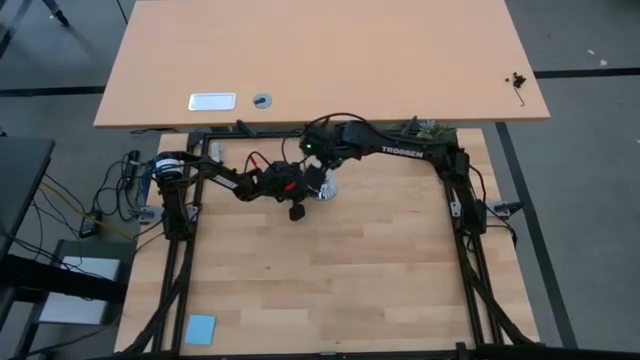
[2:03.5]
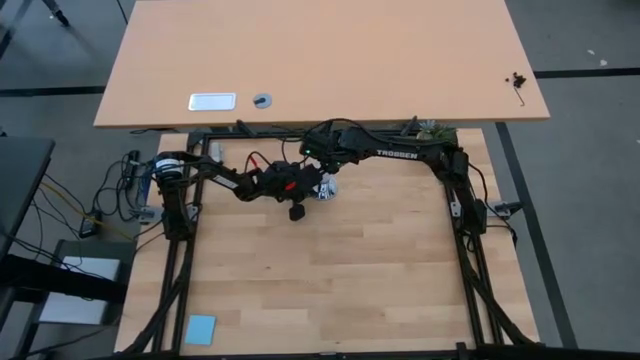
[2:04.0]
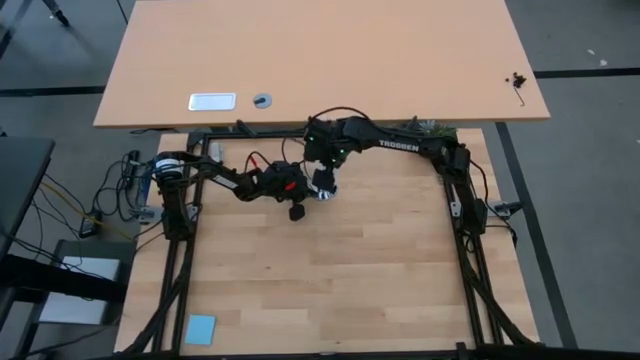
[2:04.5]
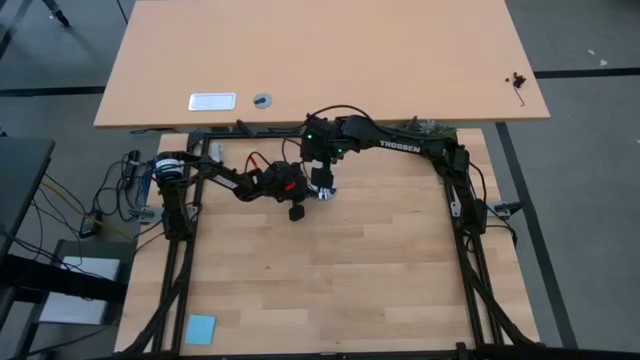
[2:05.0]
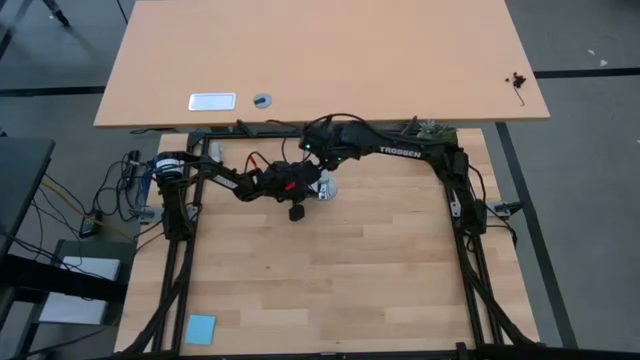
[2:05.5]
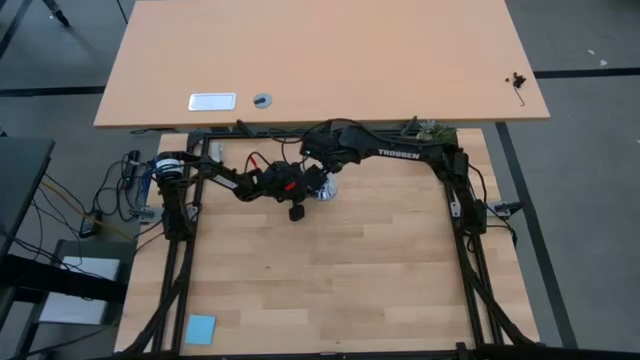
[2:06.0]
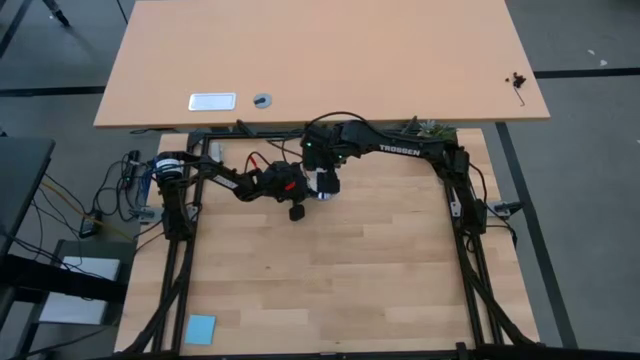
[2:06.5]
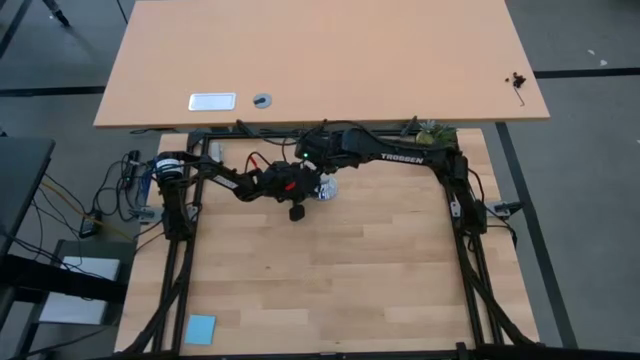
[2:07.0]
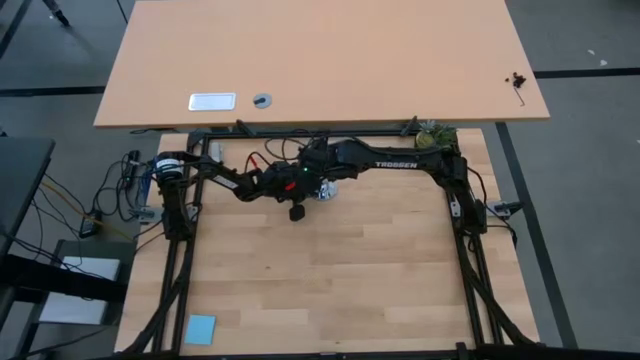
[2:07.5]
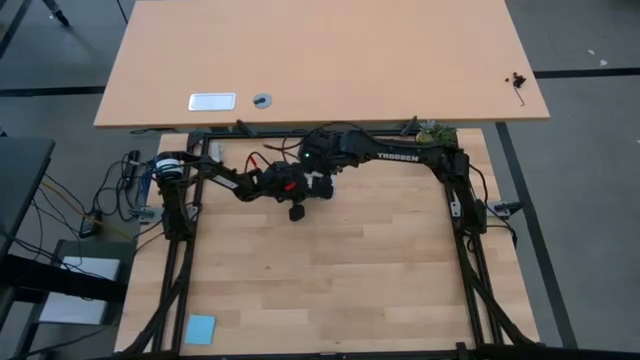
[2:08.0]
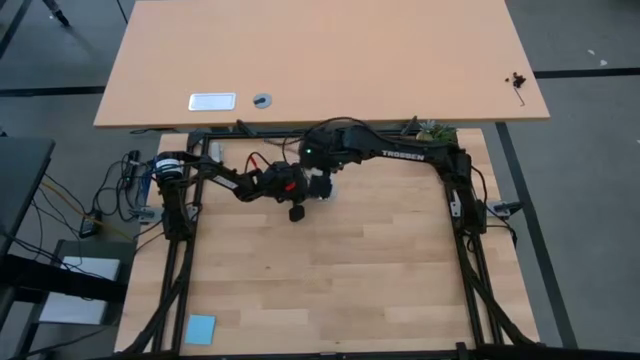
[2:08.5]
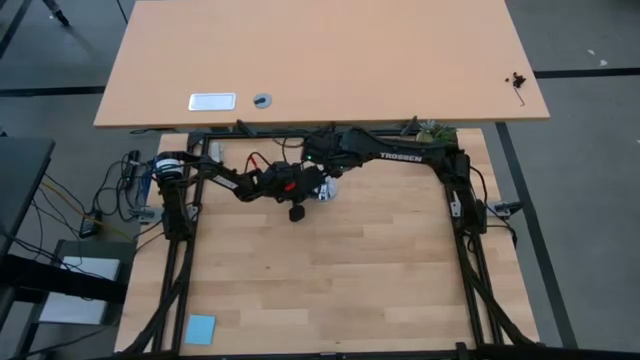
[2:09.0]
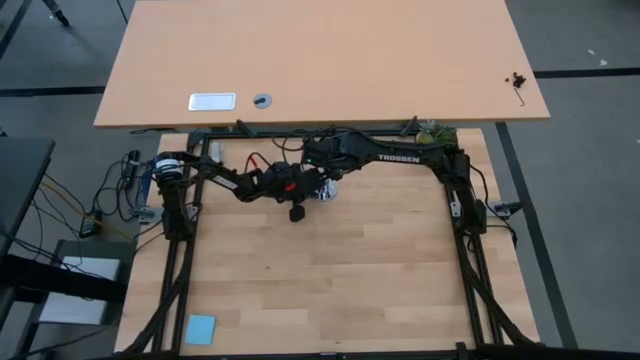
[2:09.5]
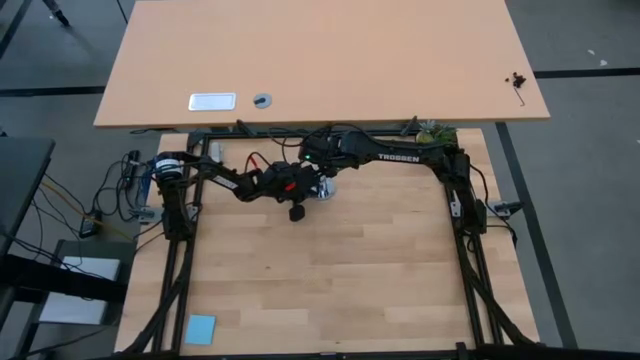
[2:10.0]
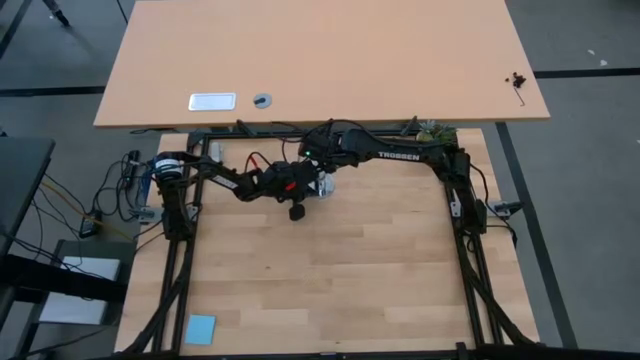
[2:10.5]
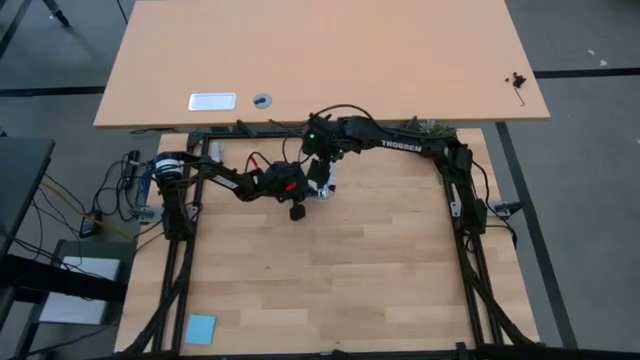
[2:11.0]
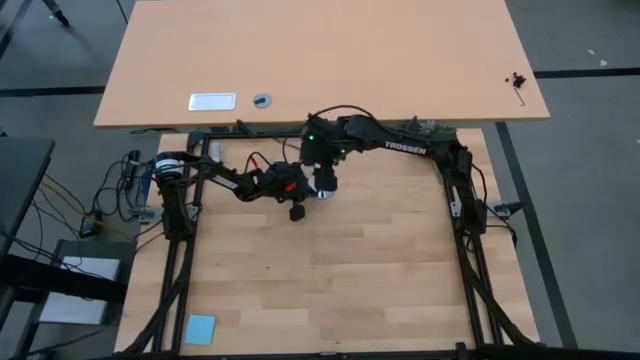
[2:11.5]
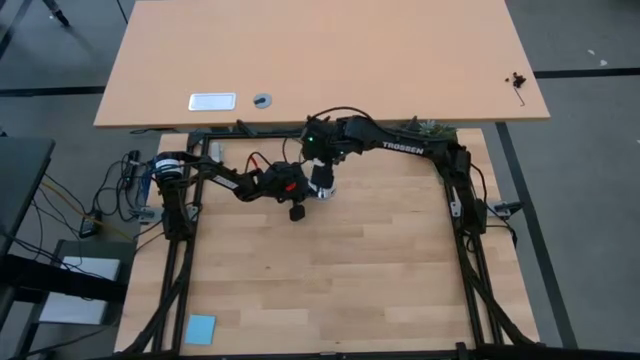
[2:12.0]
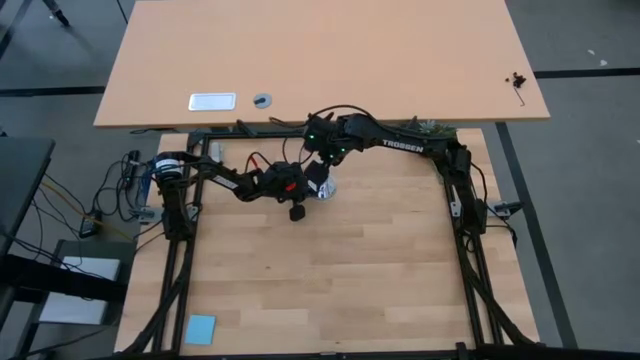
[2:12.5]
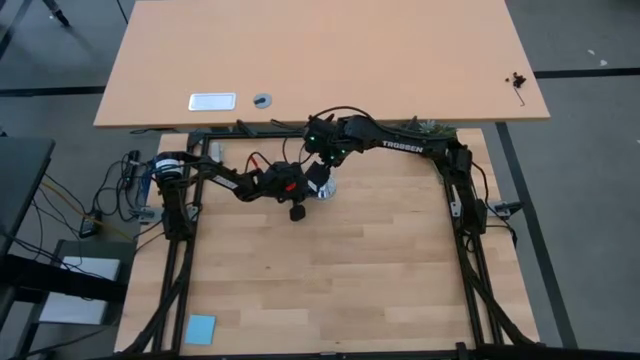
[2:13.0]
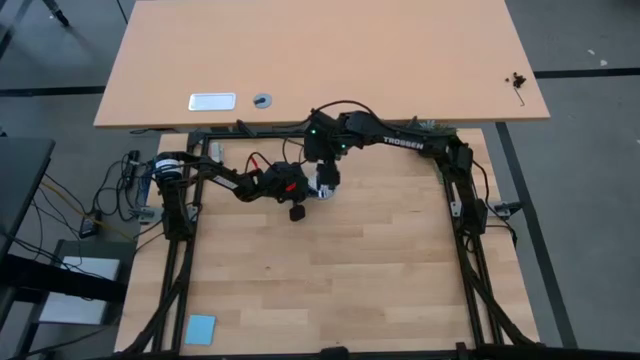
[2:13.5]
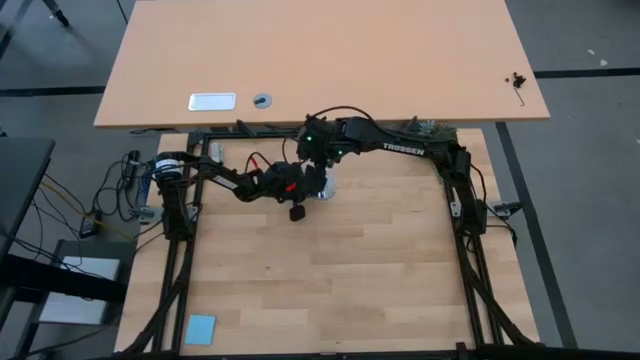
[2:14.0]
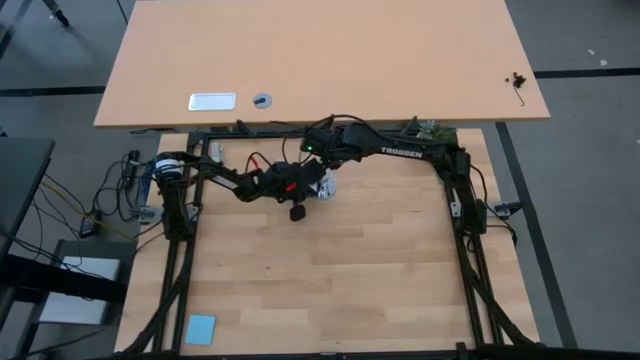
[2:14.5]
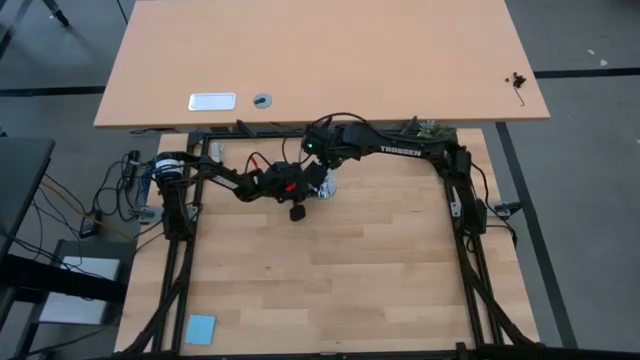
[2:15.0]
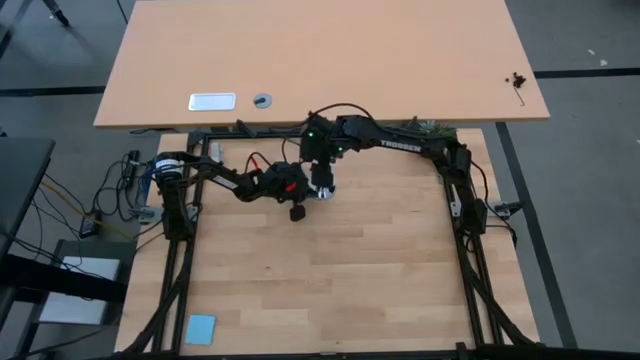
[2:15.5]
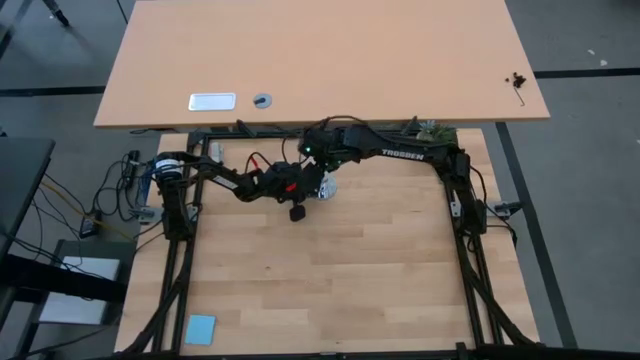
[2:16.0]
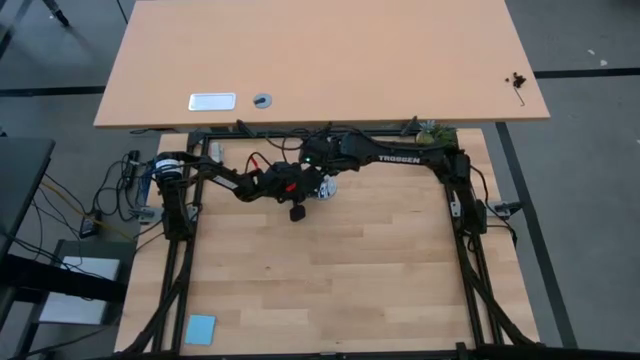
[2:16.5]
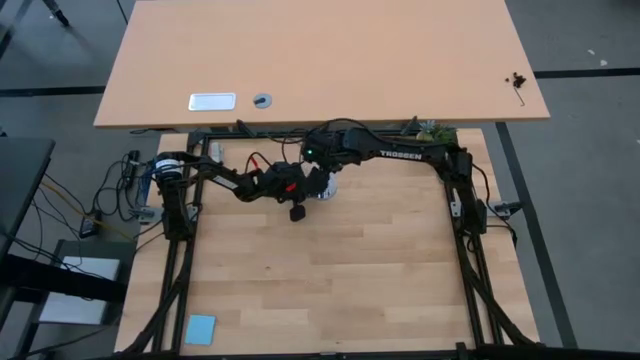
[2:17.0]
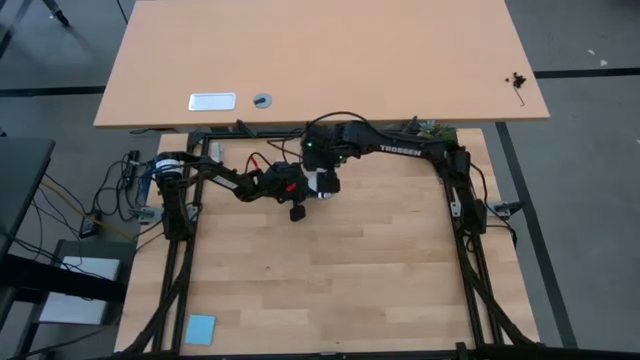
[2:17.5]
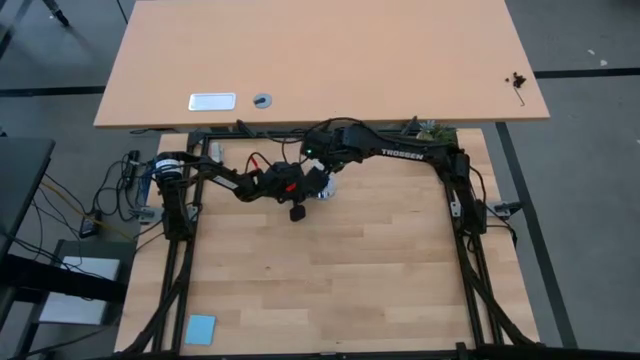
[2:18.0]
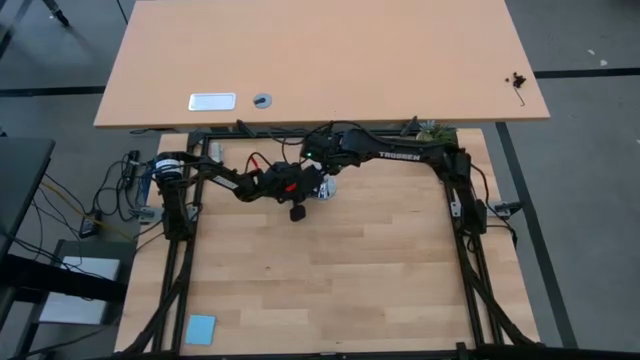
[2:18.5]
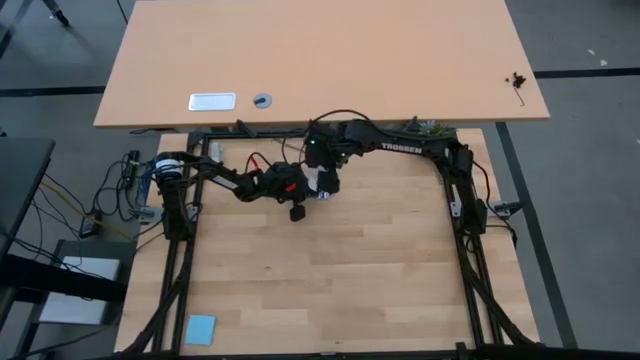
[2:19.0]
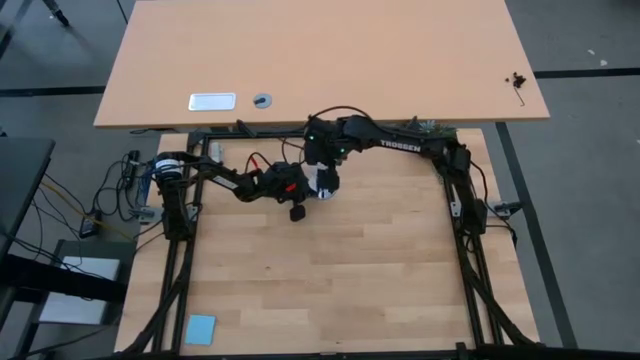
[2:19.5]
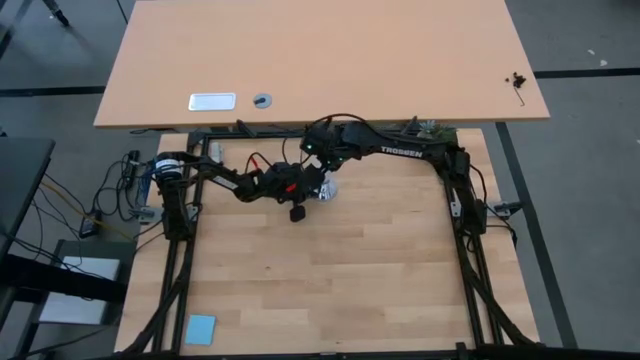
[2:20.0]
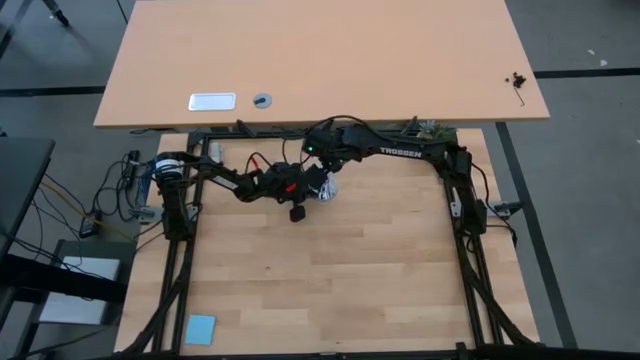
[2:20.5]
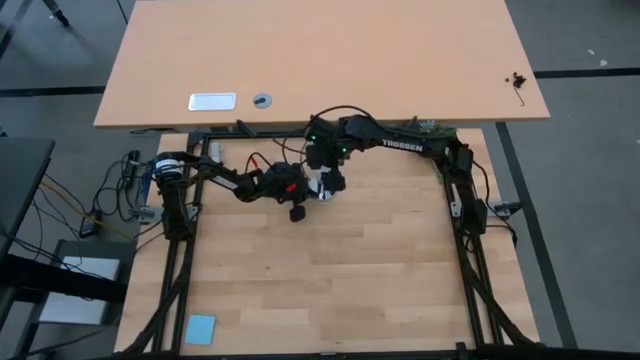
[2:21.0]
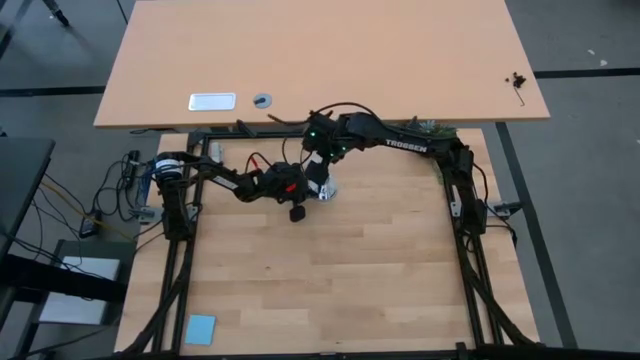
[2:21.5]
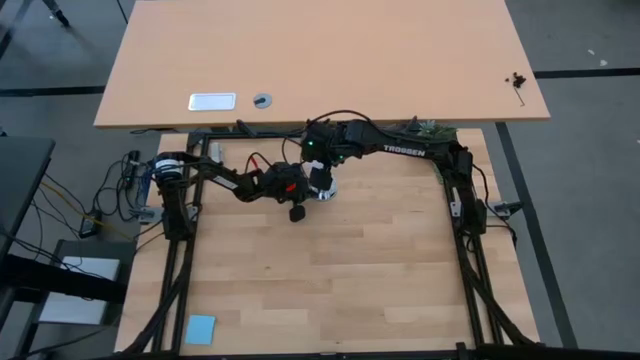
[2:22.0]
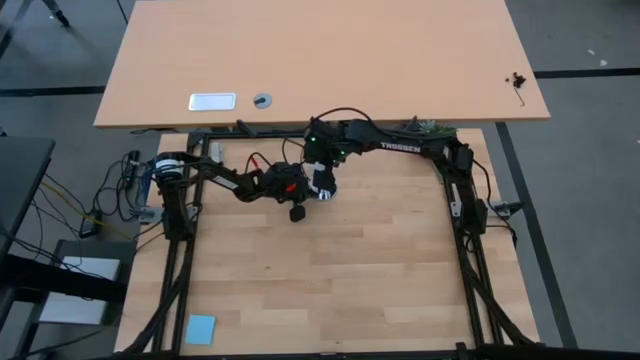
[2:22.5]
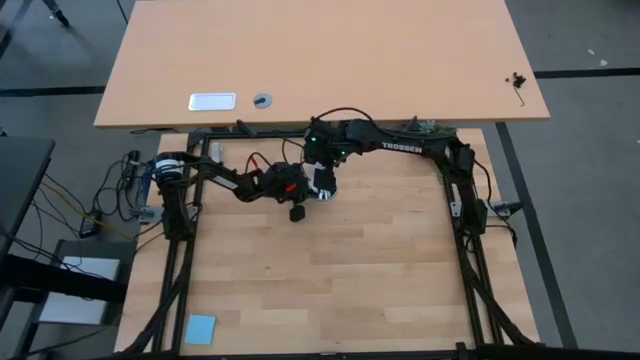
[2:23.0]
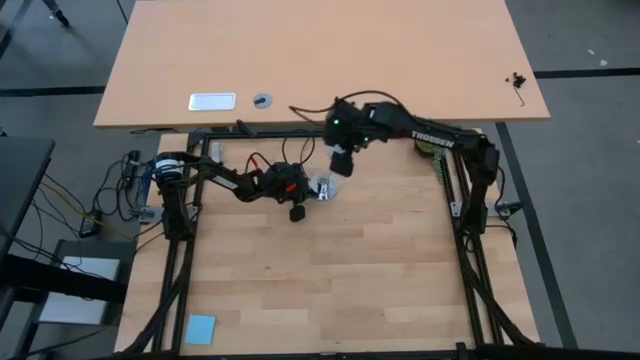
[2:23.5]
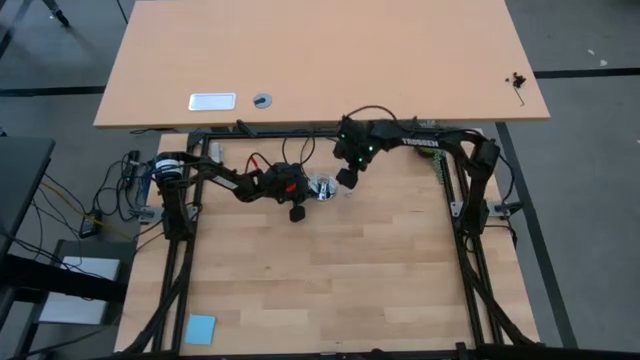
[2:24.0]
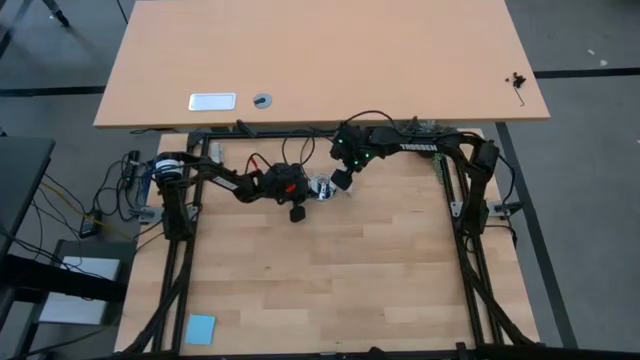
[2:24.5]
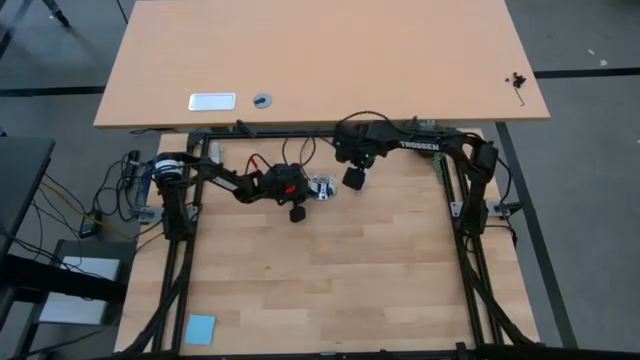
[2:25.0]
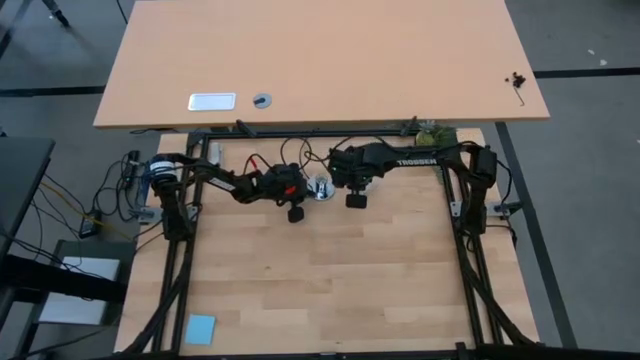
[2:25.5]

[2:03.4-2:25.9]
Task: Screw lightbulb
Remove the lightbulb from the lamp
